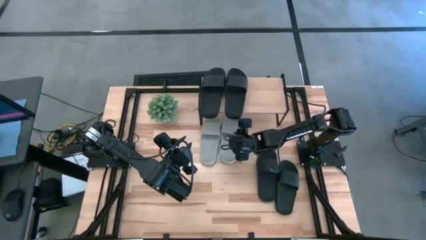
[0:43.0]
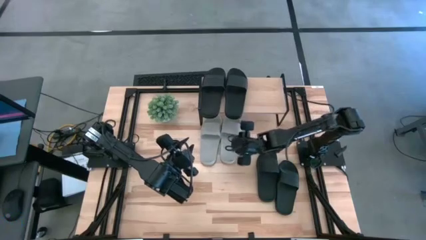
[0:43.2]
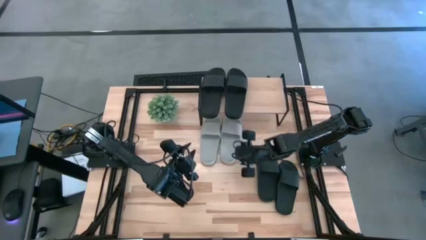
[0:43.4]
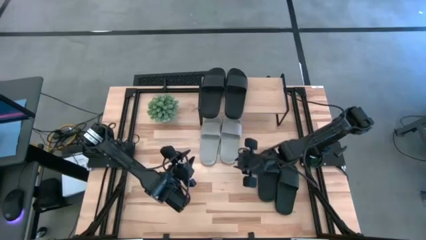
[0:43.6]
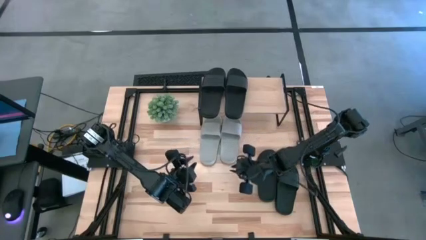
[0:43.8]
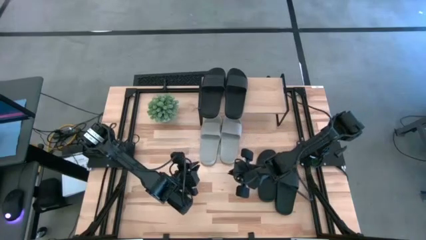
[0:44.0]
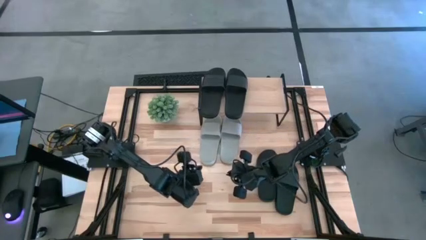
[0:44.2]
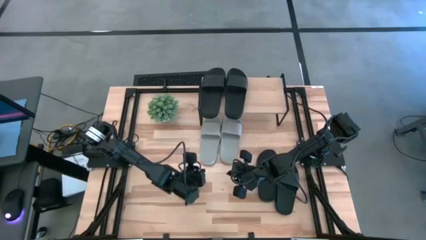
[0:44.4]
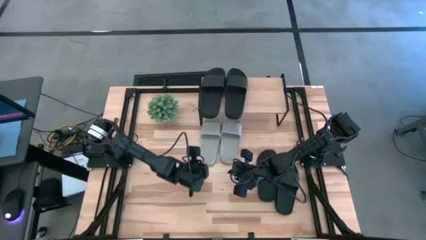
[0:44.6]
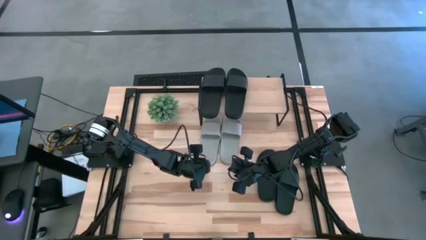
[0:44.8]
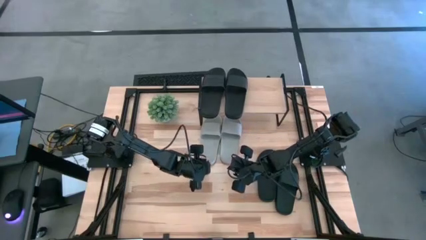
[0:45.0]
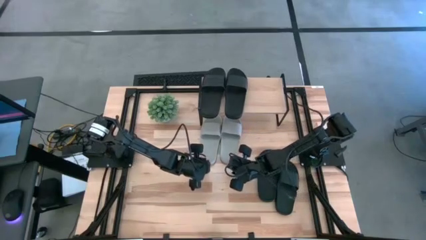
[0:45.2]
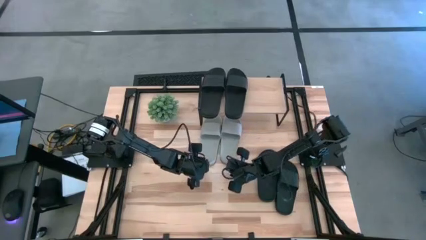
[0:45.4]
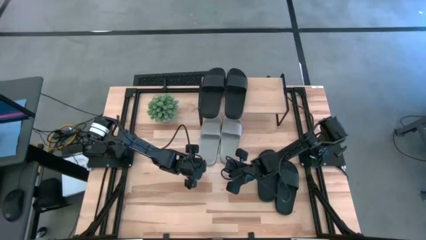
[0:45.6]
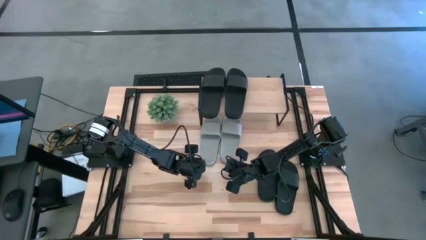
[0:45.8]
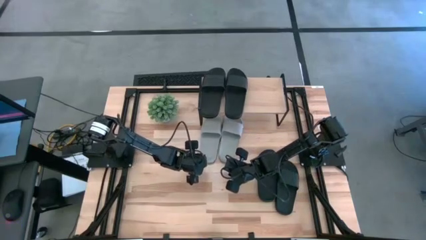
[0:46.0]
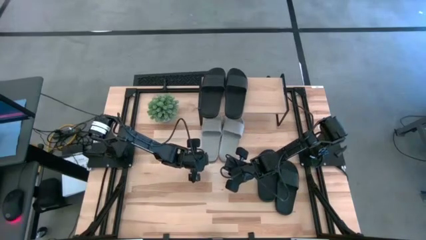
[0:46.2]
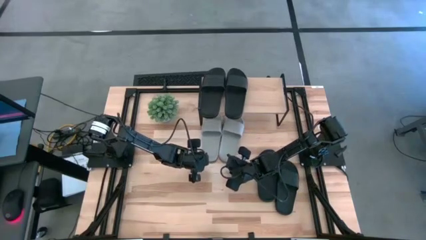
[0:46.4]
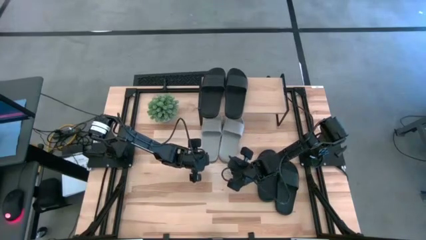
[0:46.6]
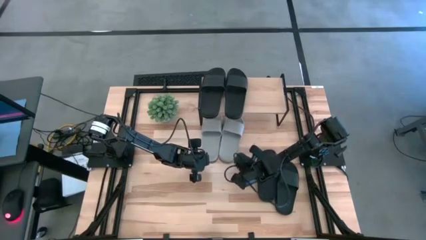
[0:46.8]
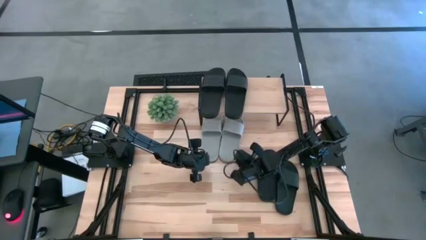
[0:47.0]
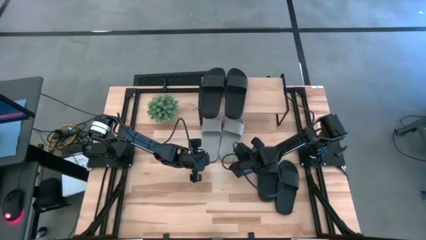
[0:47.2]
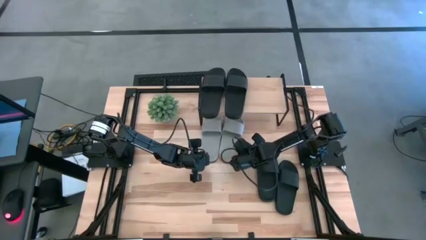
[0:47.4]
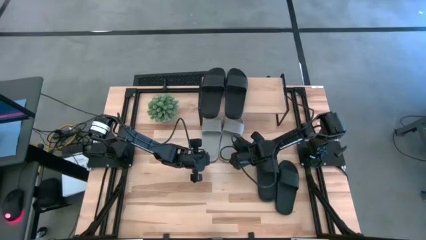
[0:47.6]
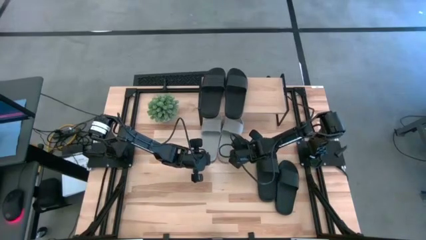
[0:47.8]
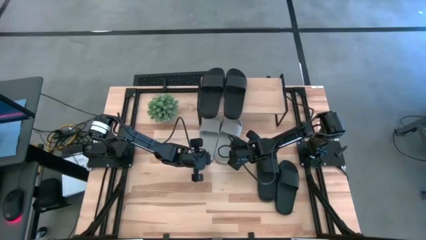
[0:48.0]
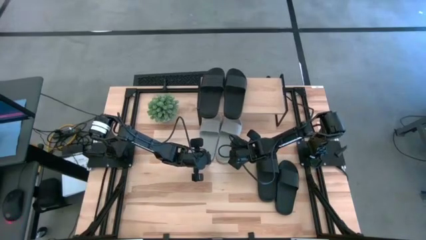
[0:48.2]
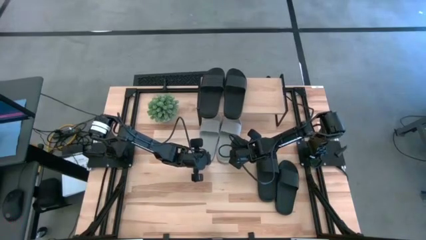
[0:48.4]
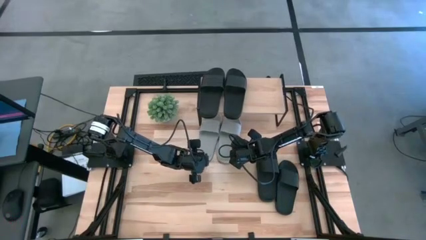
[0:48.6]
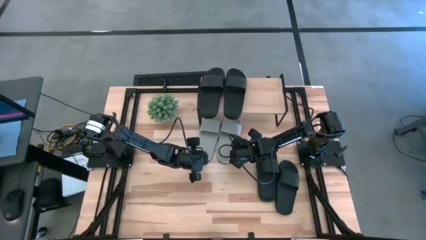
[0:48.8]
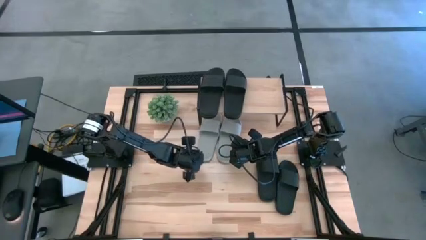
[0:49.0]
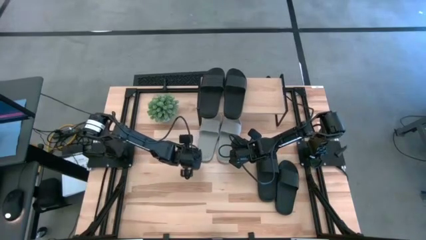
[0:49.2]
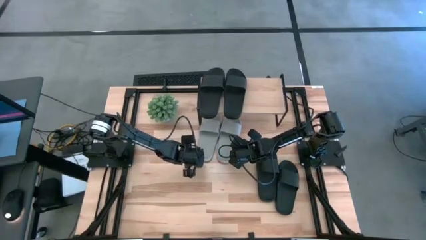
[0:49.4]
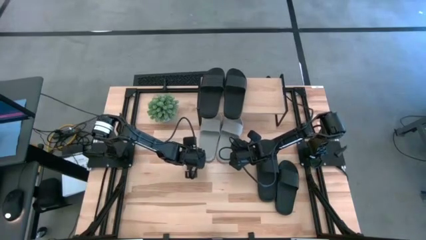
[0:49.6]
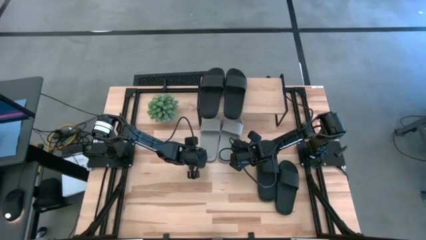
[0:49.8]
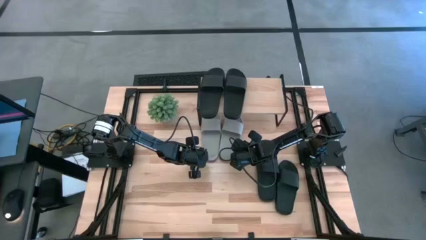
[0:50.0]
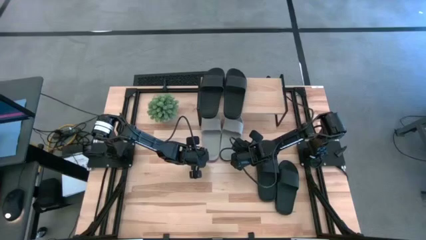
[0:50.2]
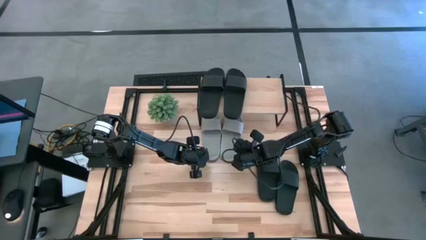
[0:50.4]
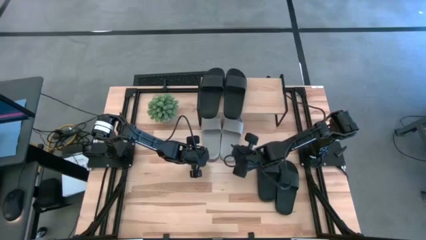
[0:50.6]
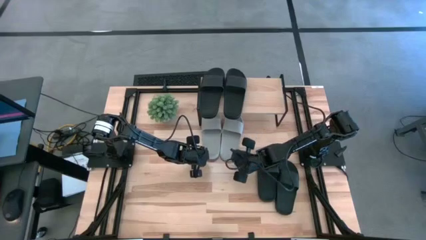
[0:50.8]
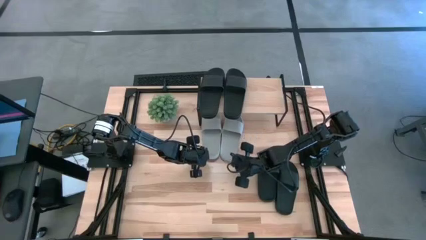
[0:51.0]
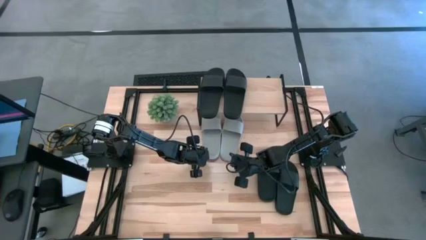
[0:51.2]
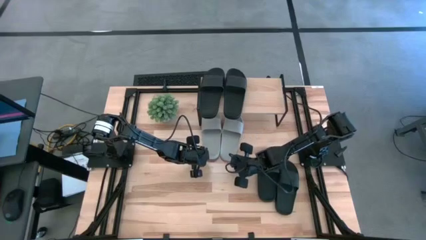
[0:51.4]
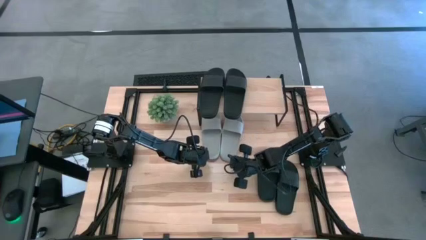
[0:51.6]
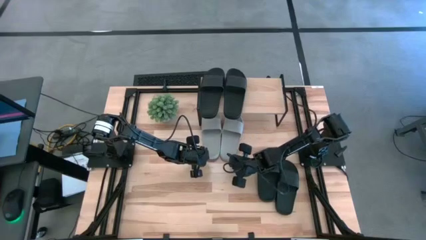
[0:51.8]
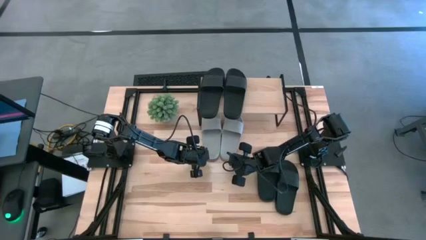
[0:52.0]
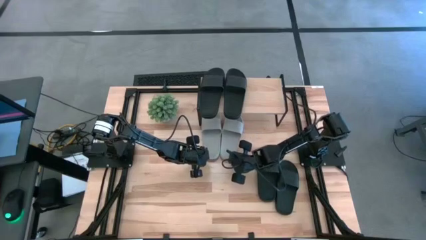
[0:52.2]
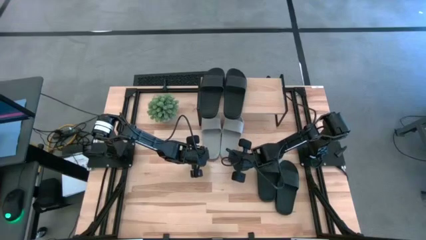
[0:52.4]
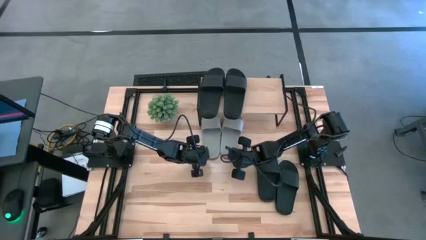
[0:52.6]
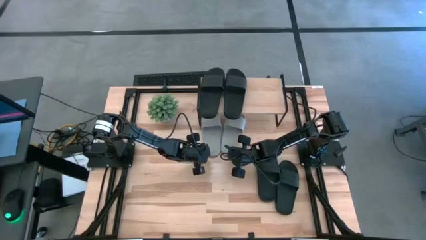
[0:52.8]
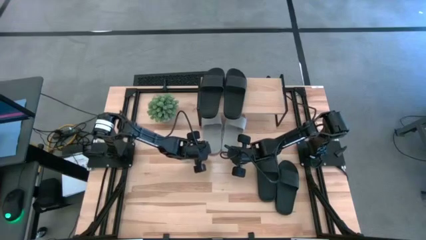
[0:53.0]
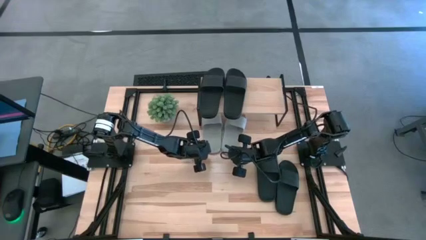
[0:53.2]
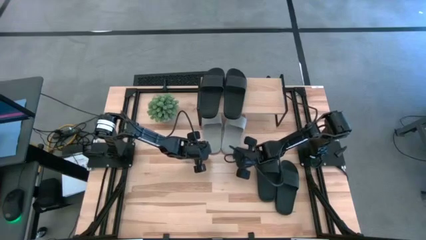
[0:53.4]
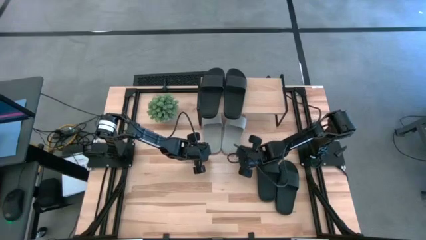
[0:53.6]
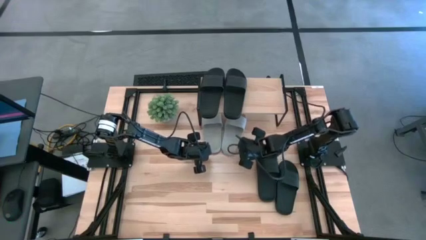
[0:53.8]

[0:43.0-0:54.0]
Task: Pick and place slides into the shelf
Adjust the gray slides under the shelf to align the position

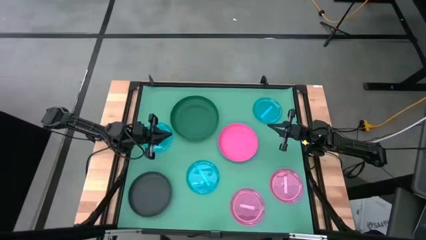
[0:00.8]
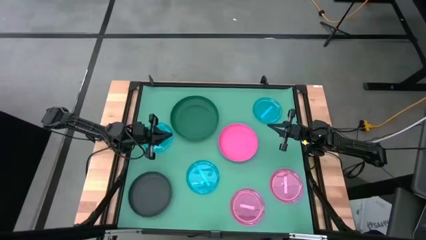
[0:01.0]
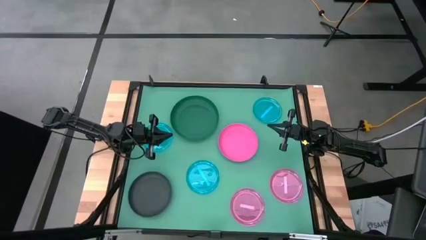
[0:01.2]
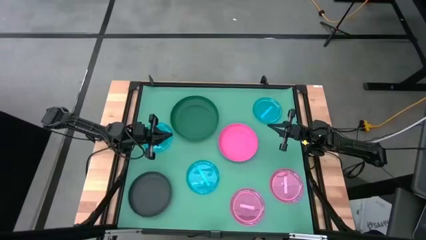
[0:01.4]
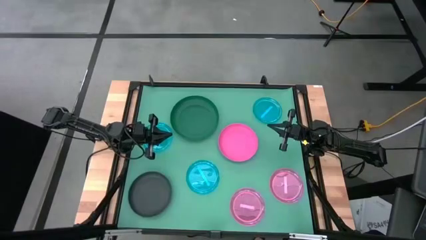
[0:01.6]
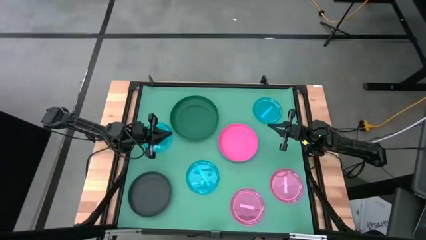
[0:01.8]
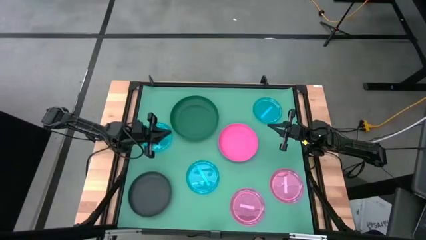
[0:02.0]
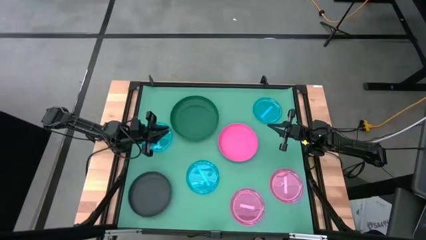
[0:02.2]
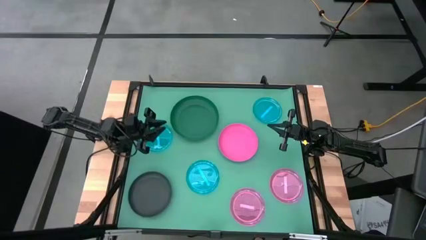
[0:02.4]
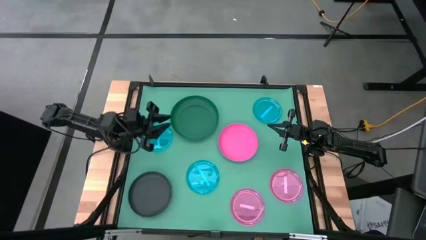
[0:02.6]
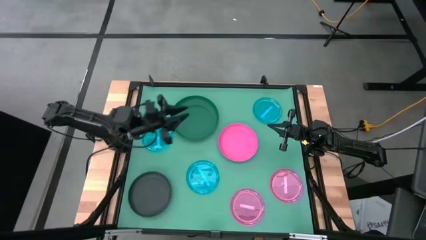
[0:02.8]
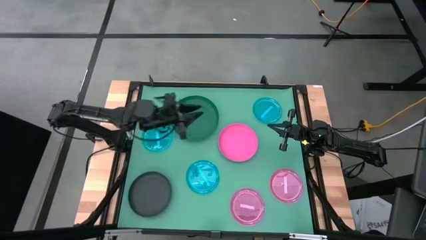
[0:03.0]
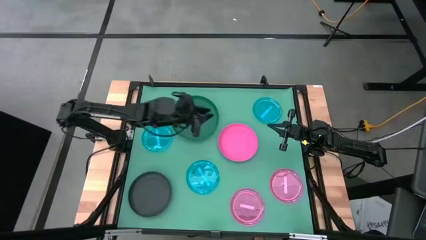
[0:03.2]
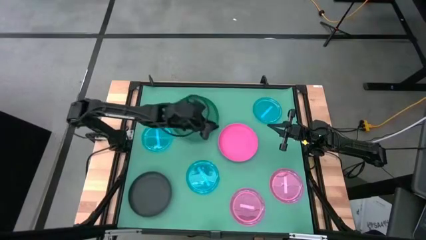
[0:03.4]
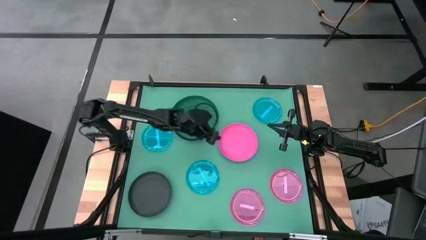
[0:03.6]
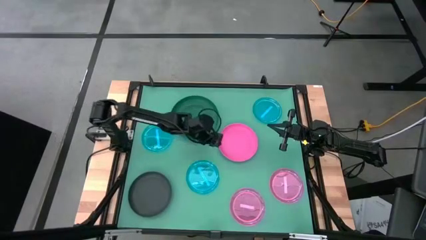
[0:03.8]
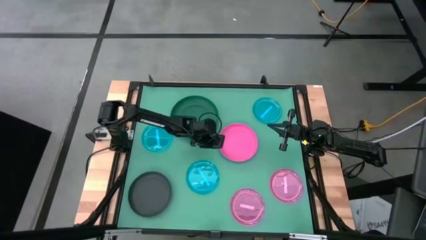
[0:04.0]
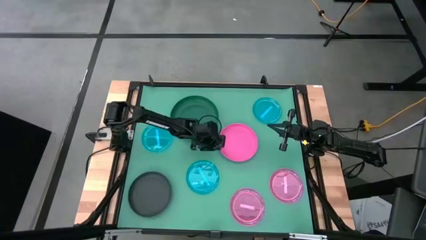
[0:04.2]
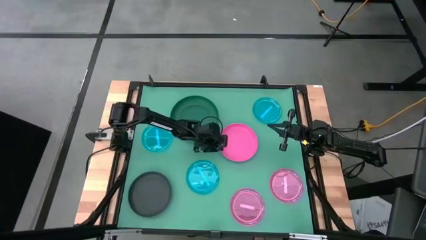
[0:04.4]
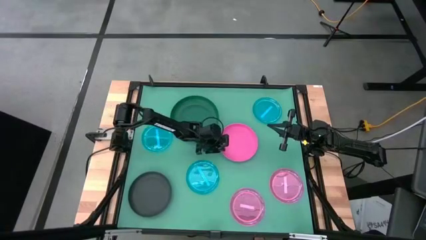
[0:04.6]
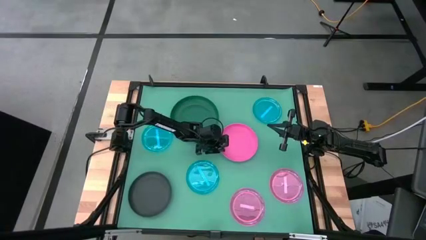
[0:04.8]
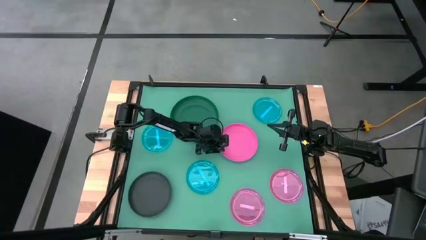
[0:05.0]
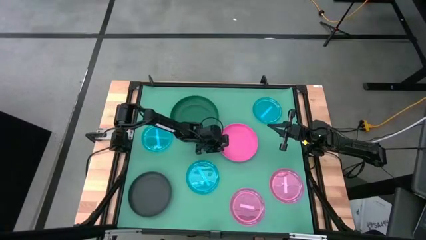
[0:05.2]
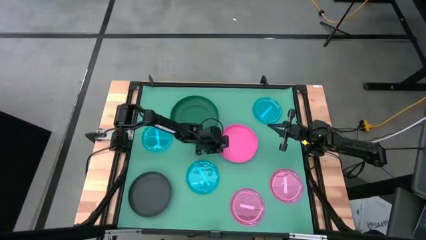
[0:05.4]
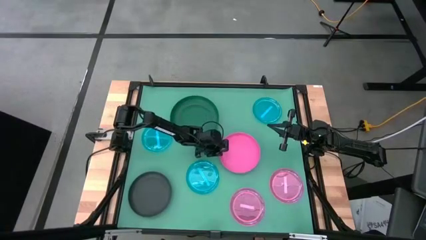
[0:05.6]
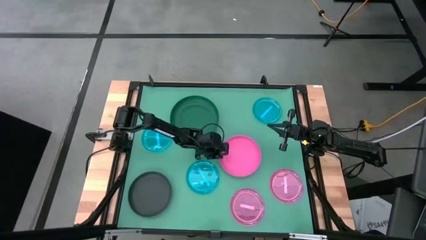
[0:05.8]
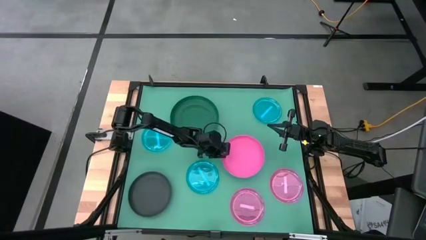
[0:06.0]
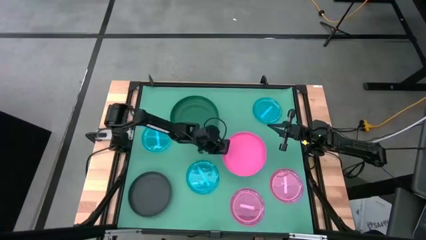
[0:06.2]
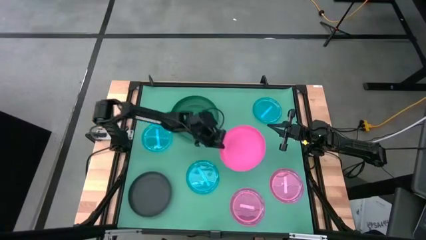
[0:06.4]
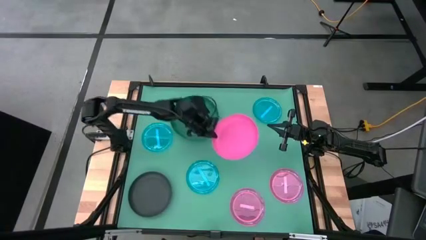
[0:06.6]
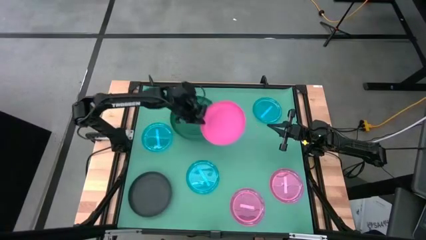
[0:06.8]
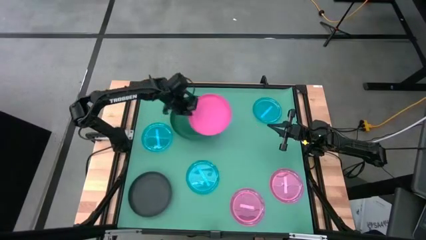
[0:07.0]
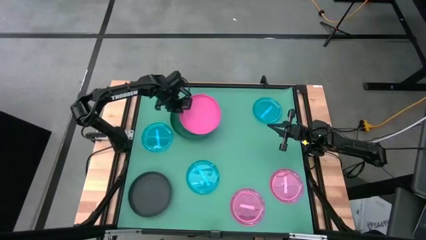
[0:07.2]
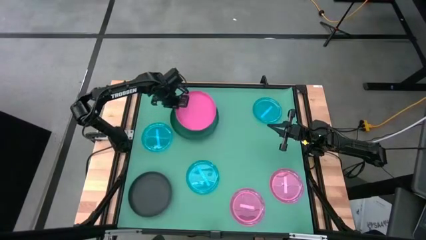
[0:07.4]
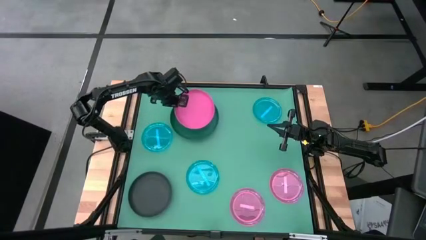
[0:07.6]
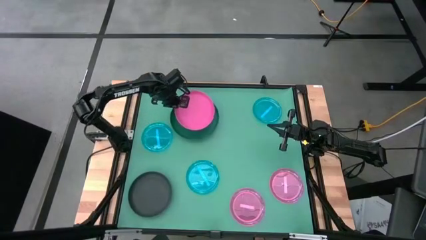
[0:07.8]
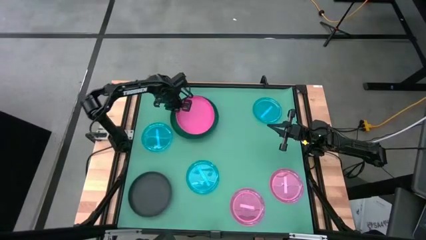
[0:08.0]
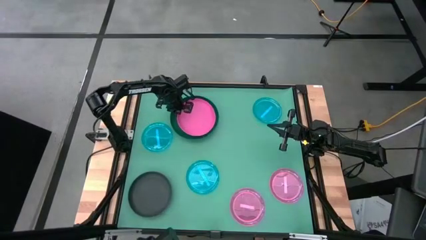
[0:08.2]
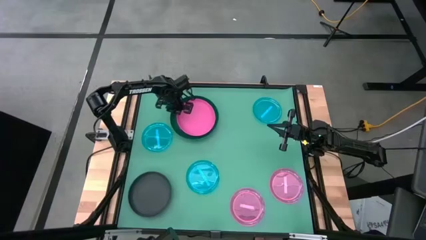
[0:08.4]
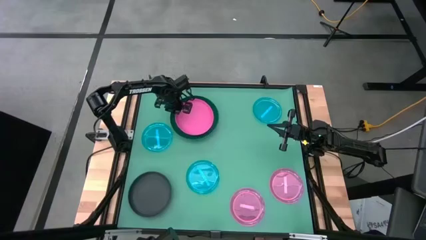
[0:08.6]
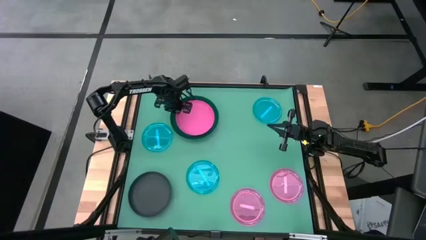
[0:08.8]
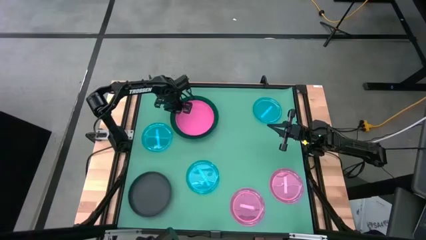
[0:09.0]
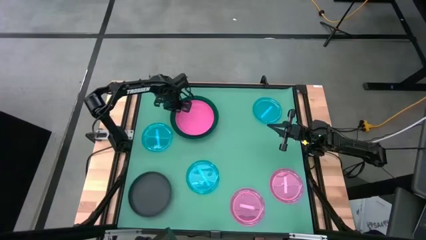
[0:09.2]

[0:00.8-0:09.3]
Task: Stack plastic plates
Stack the pink plate on top of the green plate
